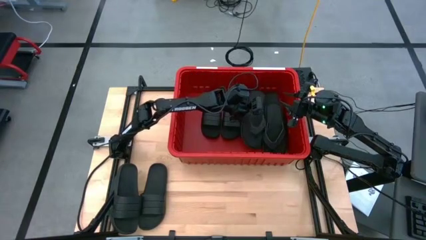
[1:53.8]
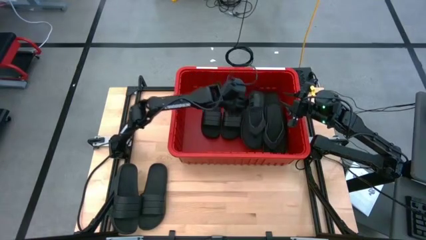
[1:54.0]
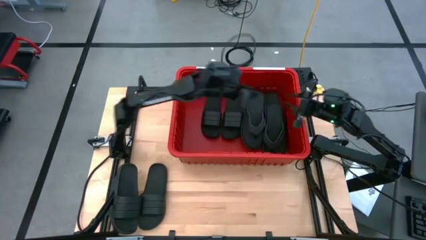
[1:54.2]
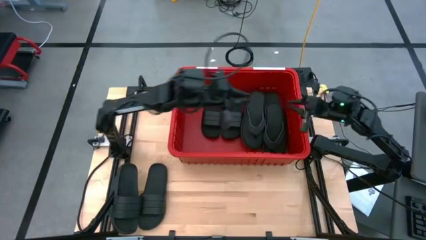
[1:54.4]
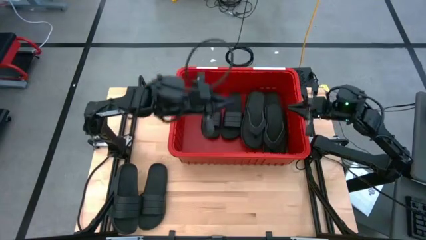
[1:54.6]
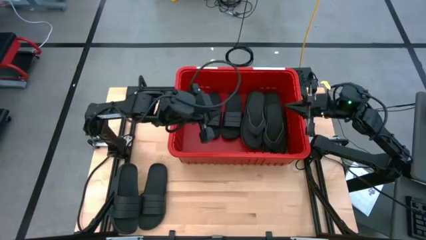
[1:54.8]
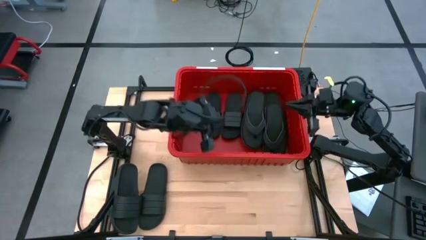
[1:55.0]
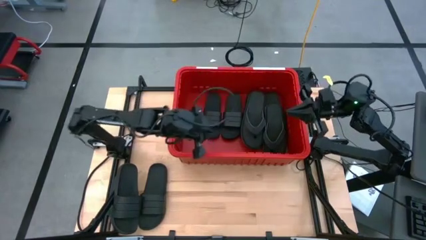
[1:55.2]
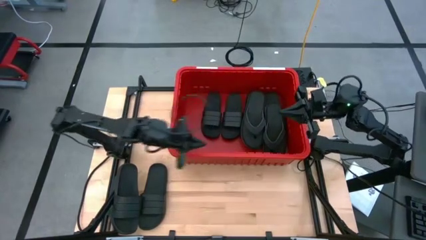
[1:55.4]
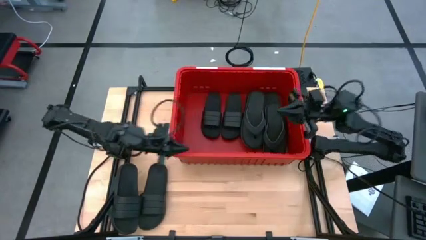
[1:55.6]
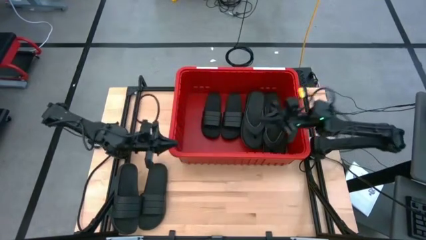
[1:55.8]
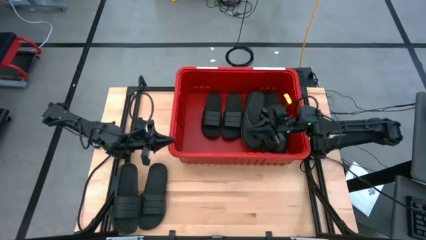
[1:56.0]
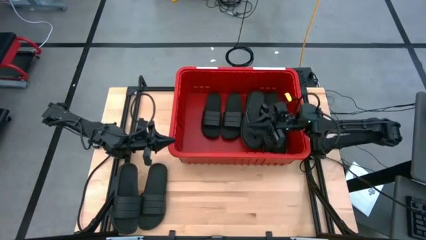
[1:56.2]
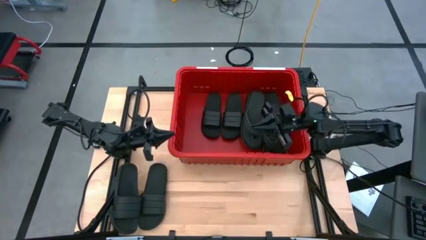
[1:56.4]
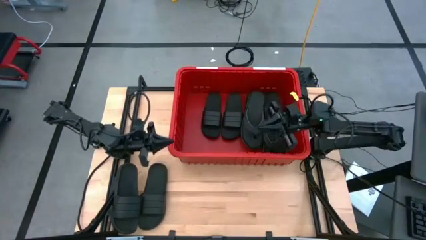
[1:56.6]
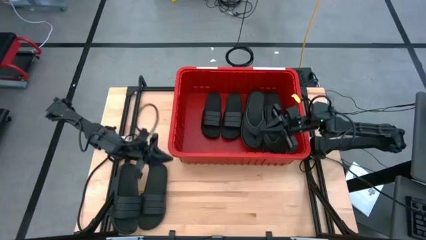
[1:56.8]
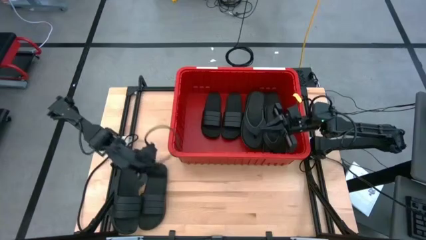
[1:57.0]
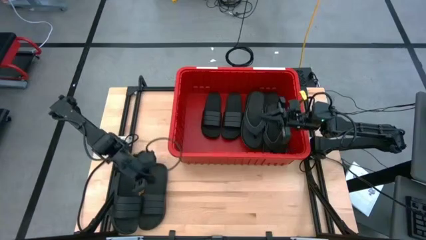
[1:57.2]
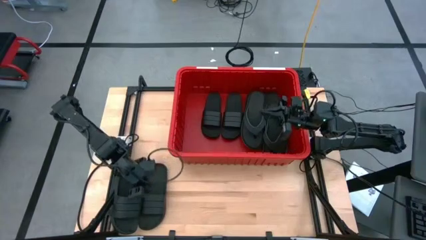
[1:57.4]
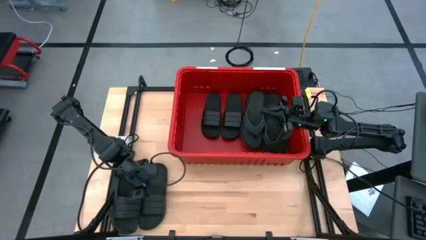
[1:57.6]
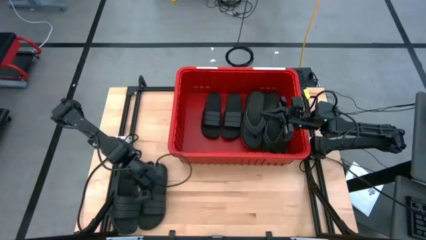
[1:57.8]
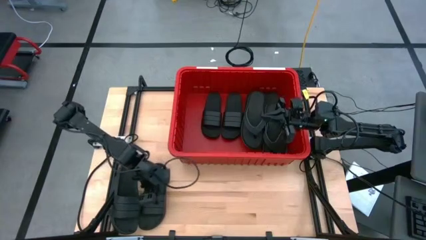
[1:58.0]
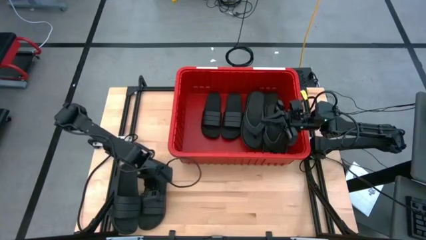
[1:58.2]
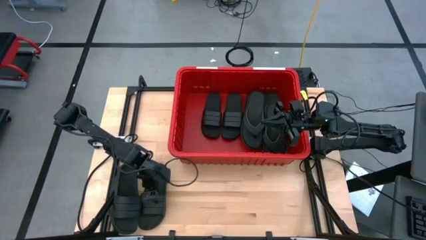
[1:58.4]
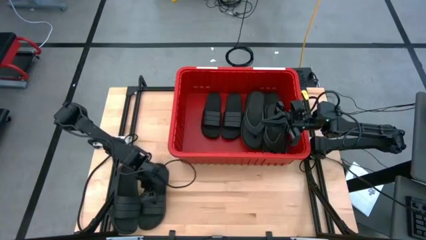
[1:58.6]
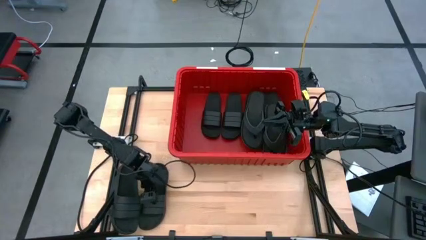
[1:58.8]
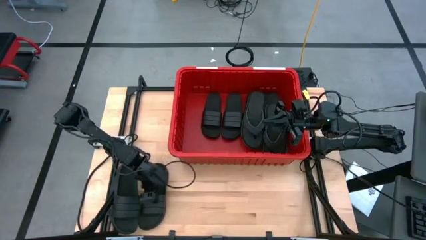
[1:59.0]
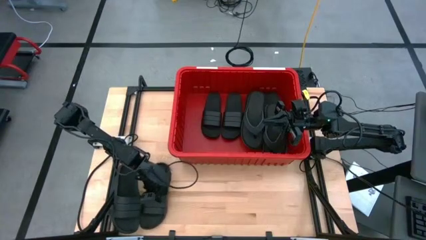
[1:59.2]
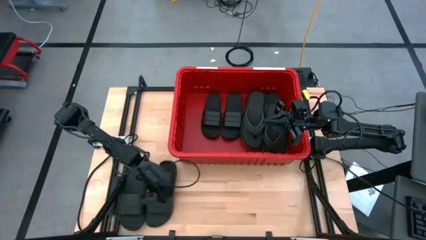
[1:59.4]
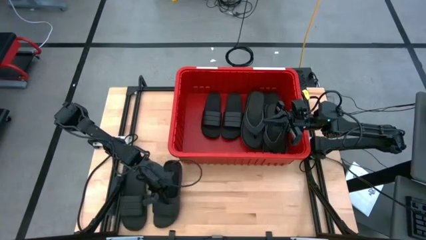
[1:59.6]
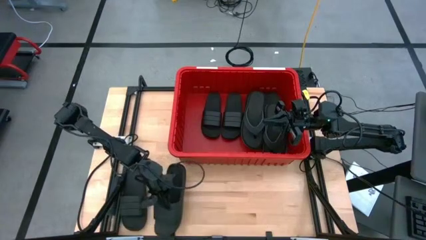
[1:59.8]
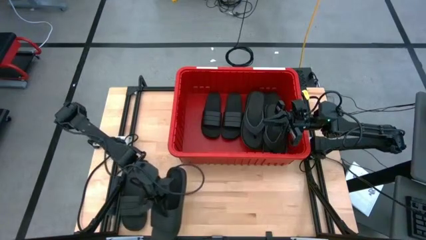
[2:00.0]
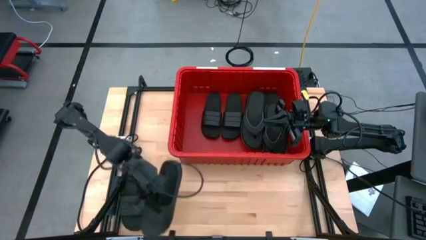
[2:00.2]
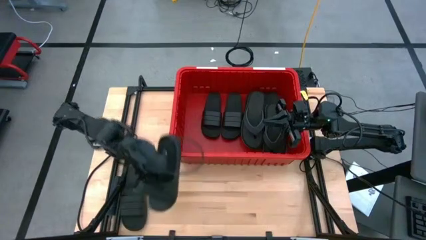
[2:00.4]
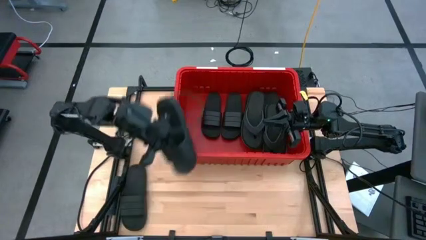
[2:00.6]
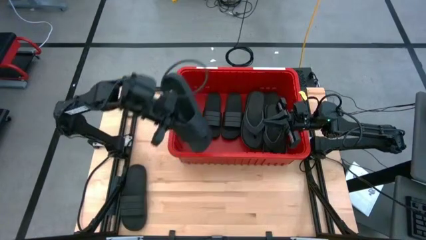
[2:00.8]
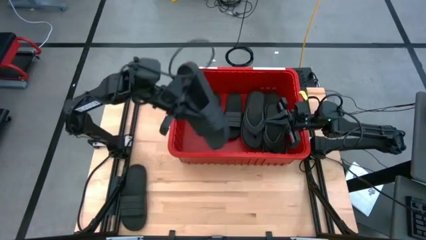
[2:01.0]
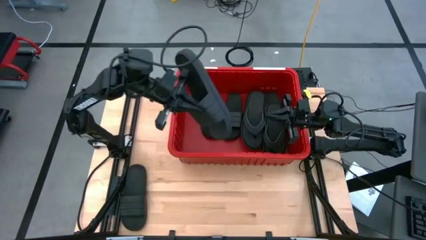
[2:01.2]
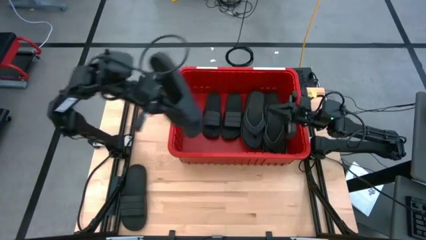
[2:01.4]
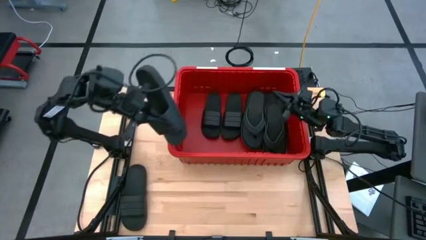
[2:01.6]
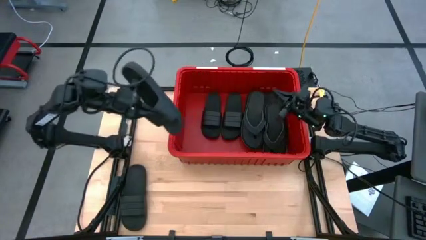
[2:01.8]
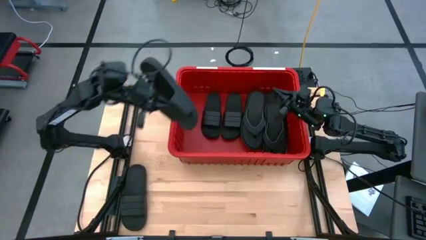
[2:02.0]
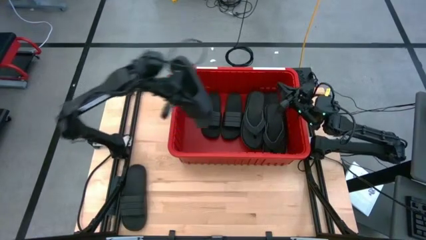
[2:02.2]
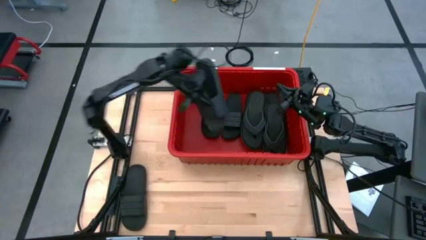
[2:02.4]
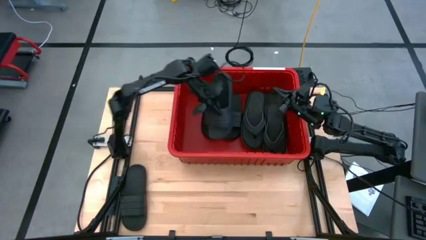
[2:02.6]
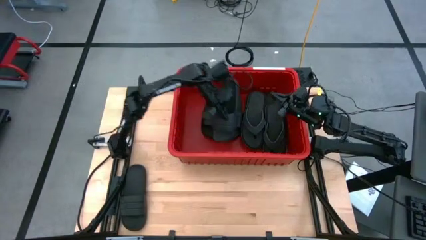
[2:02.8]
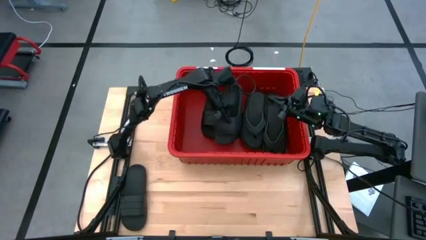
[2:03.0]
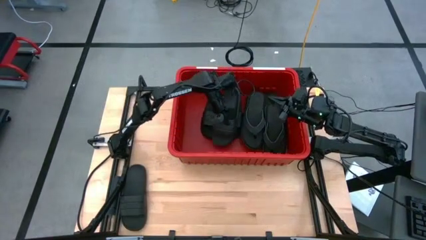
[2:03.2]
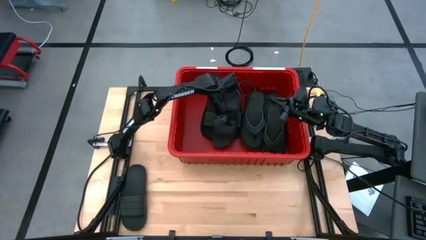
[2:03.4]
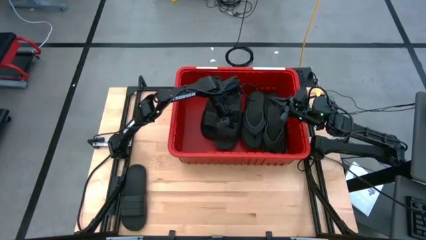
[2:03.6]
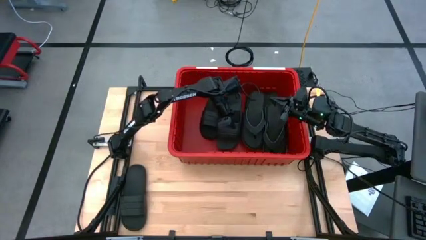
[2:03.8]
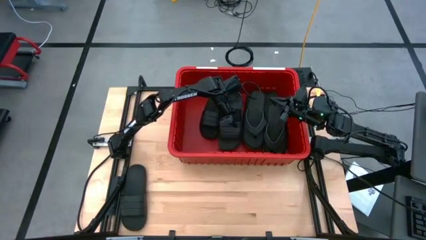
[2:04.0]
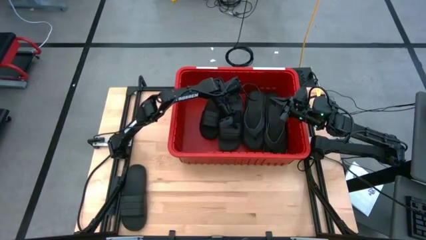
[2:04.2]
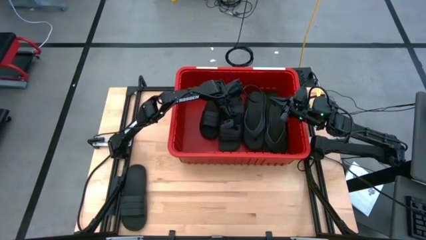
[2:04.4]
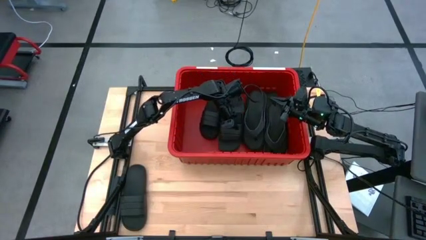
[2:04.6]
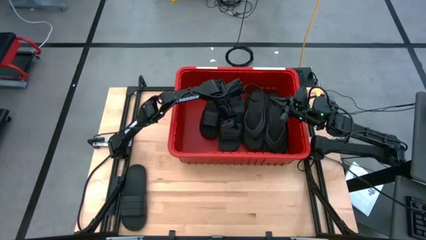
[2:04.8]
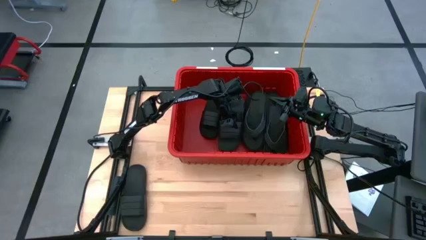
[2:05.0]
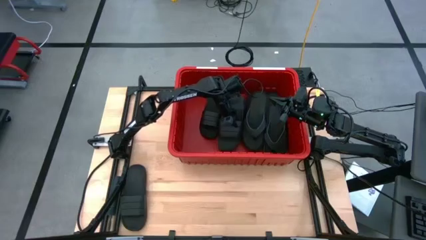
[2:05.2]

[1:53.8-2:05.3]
Task: Pick and place slides into bin
Put the right slide into the bin

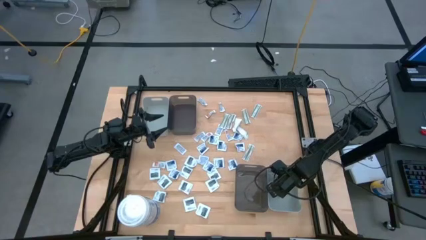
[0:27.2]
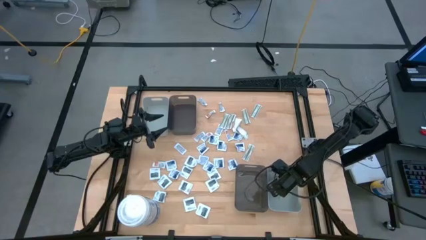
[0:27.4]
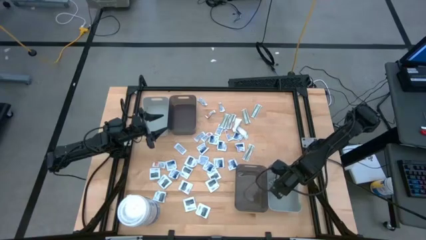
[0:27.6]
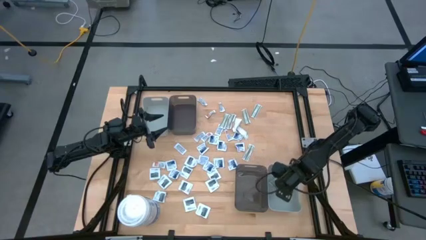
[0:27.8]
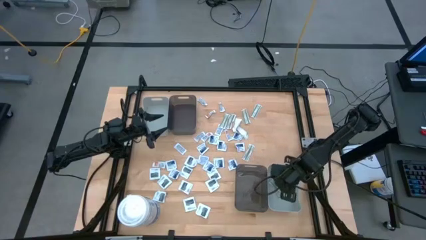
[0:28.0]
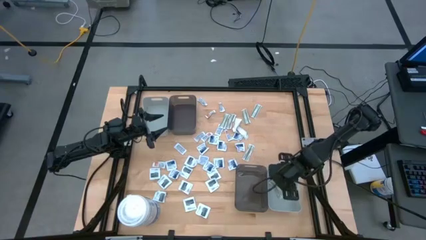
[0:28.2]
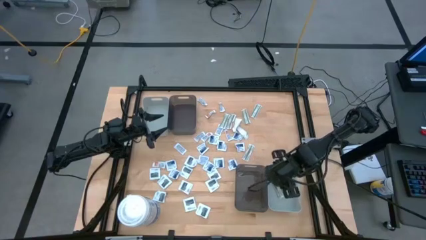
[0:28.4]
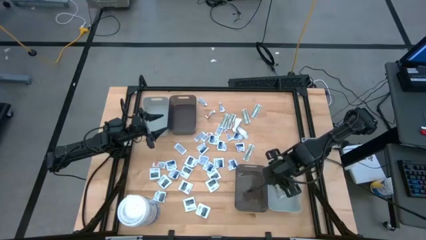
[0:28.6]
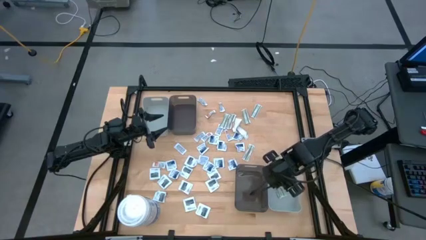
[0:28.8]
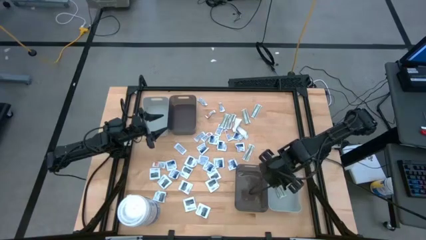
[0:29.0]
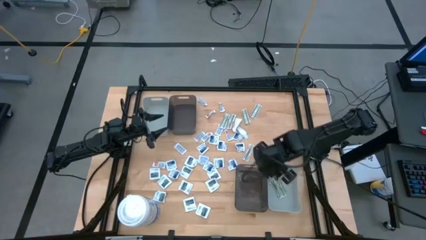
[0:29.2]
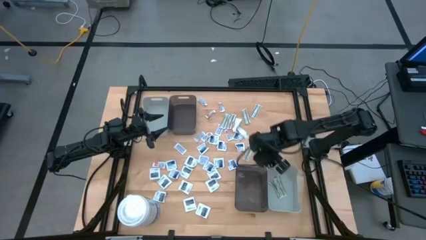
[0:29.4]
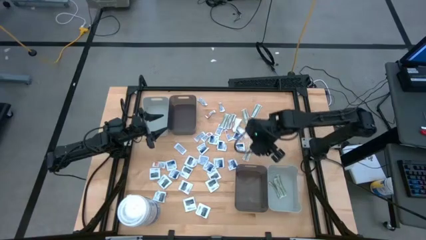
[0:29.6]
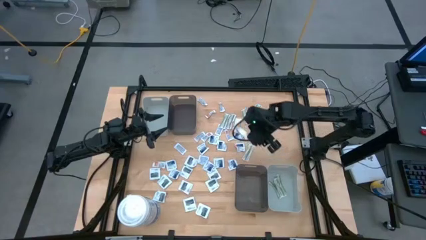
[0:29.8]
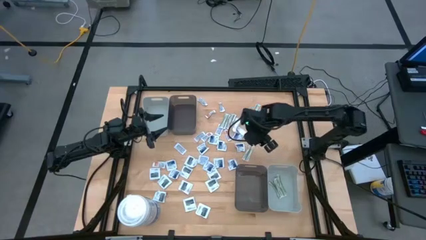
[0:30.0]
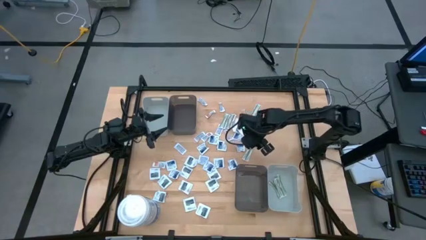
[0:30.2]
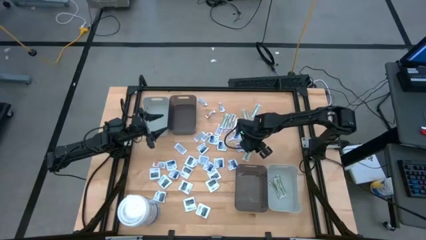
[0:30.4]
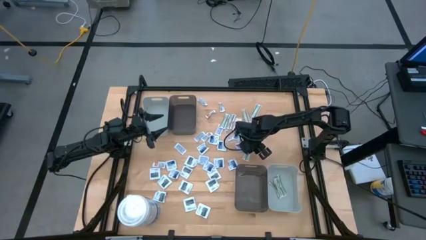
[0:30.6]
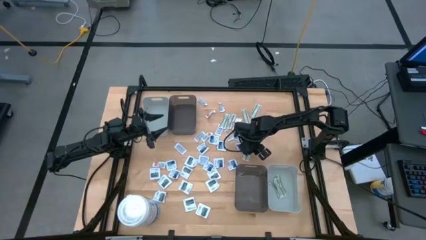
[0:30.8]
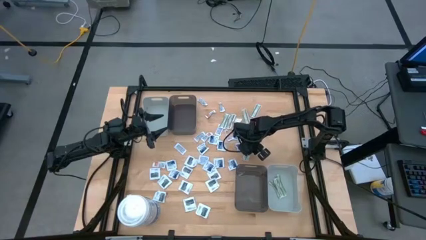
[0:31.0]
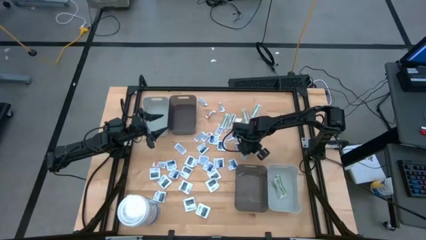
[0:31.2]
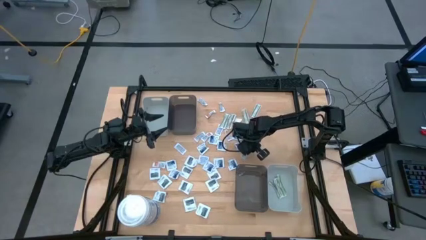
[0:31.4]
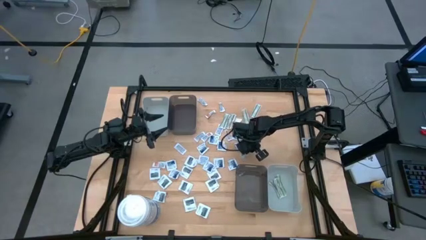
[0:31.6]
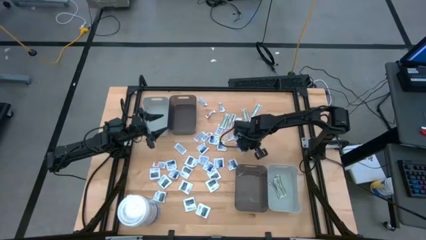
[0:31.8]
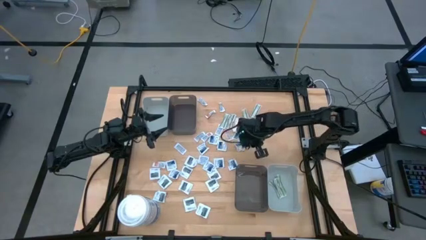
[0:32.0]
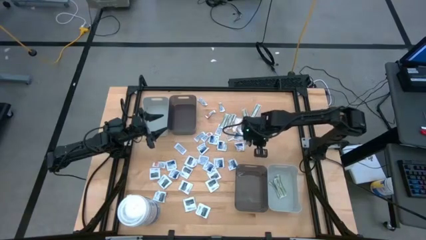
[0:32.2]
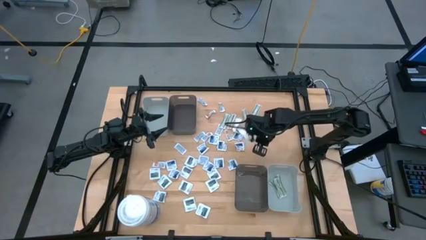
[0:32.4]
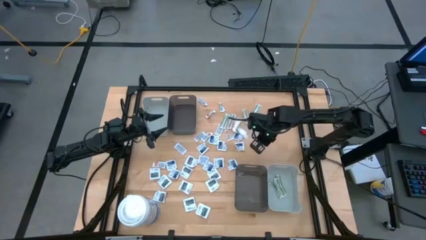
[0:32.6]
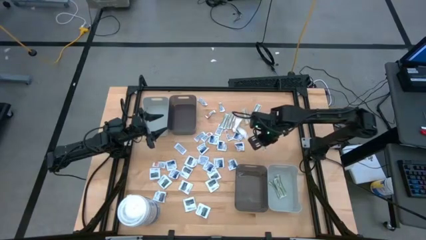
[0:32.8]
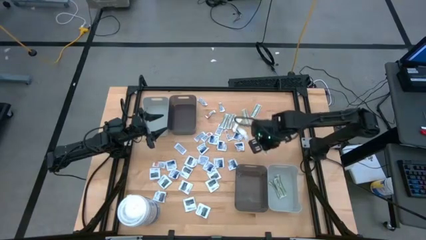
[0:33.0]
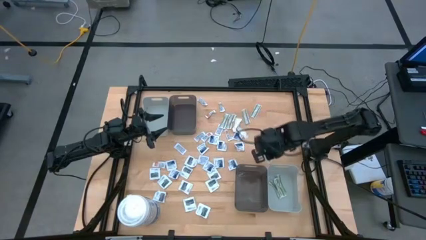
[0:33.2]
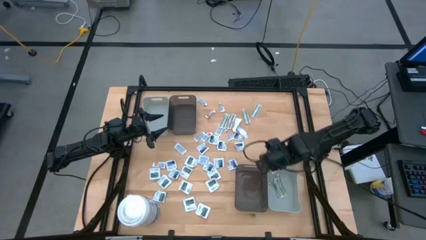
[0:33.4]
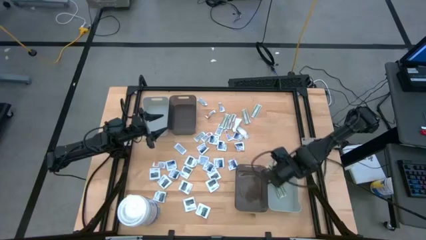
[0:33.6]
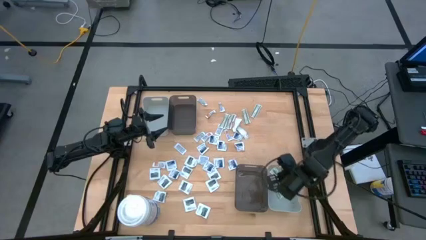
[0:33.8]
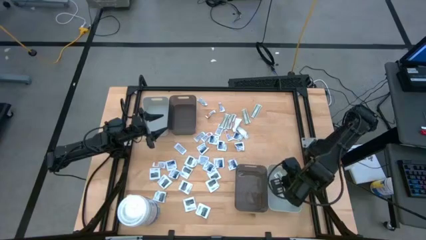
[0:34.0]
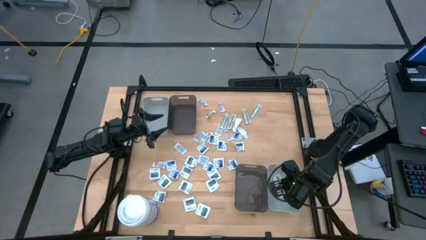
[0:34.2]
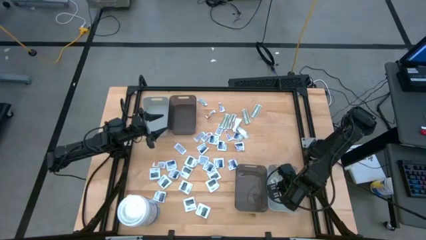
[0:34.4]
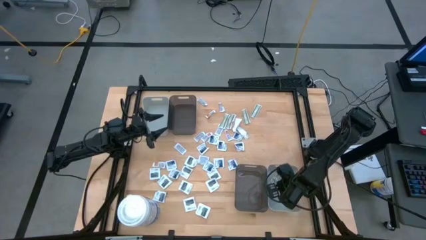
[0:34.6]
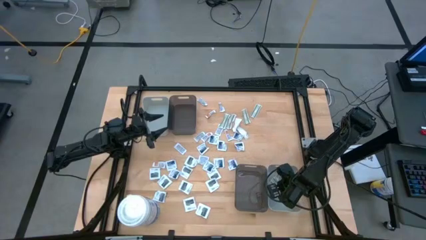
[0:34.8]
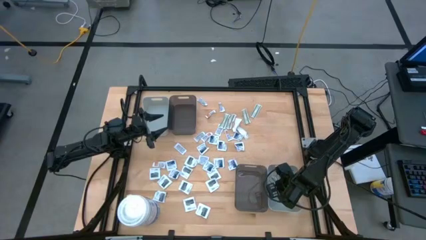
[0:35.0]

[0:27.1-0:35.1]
Task: Pick & Place First Aid Supplies
Put the white bandage pack into the bottom gray bin
